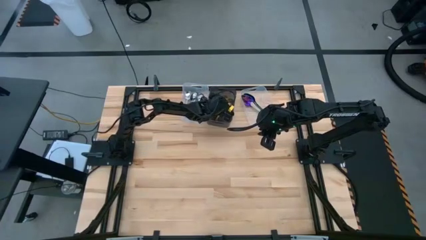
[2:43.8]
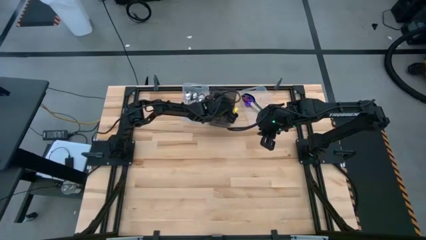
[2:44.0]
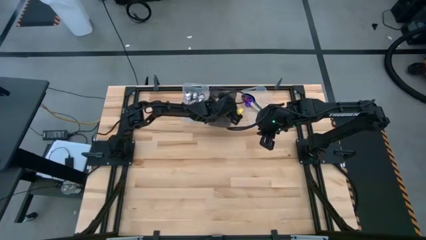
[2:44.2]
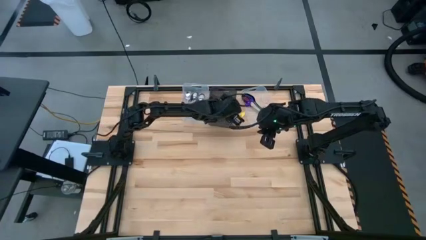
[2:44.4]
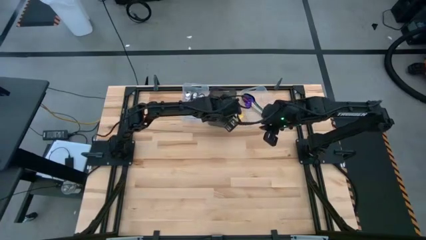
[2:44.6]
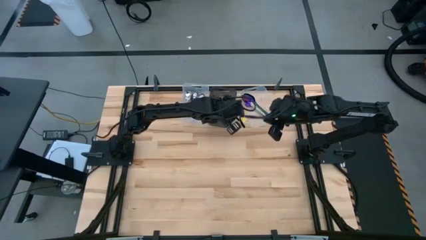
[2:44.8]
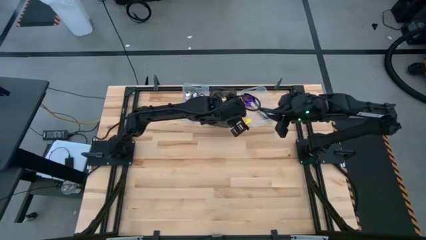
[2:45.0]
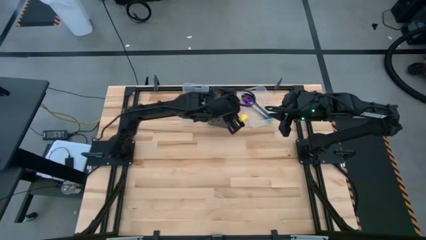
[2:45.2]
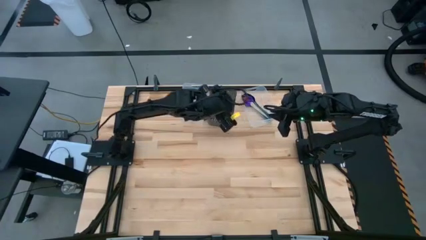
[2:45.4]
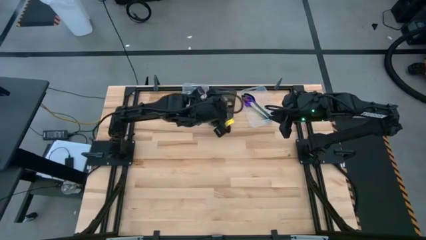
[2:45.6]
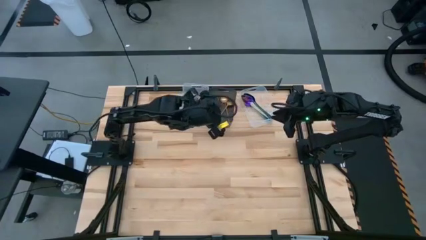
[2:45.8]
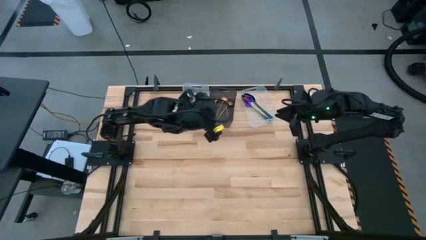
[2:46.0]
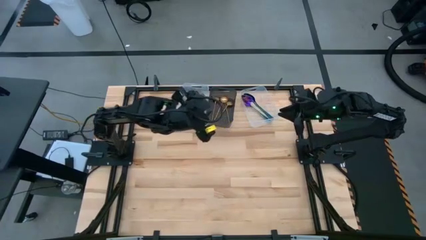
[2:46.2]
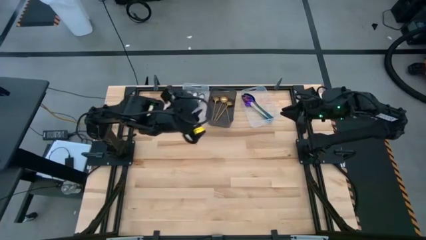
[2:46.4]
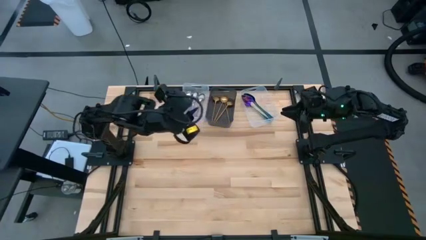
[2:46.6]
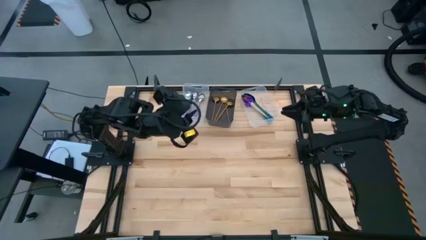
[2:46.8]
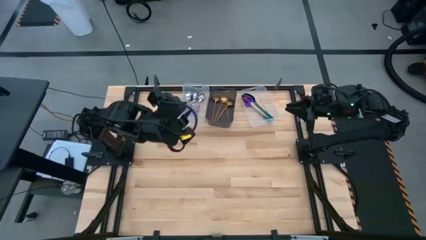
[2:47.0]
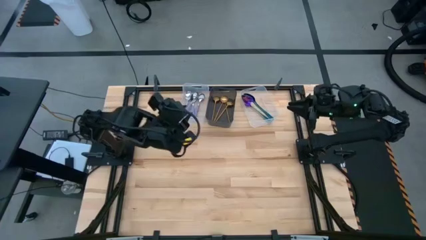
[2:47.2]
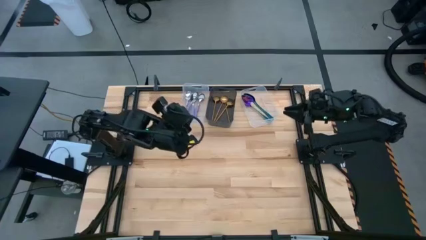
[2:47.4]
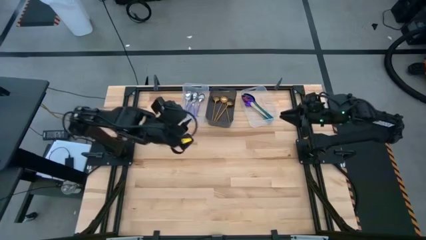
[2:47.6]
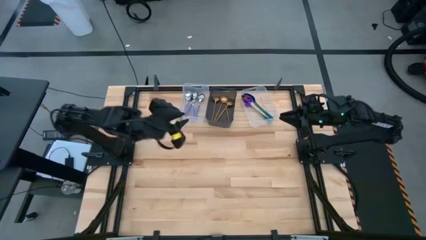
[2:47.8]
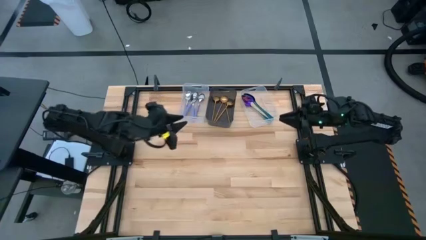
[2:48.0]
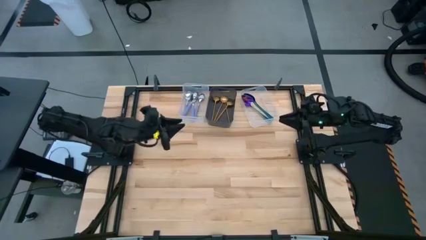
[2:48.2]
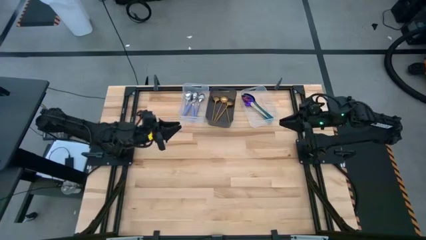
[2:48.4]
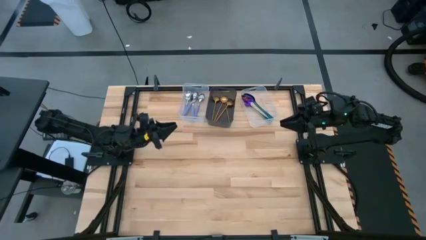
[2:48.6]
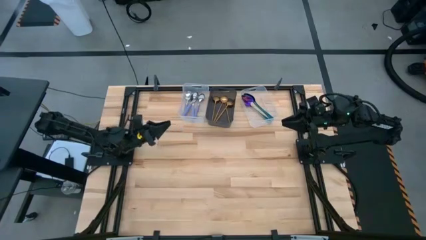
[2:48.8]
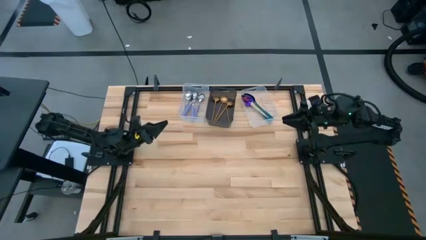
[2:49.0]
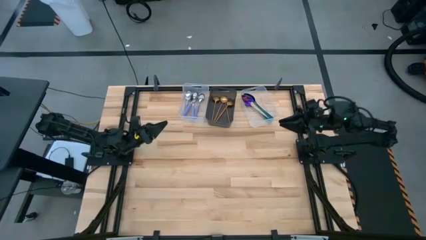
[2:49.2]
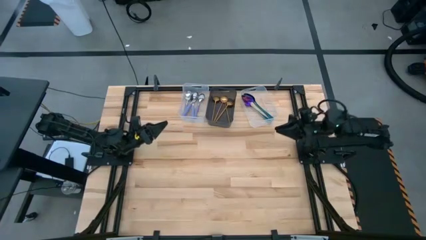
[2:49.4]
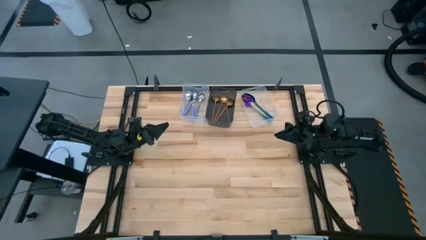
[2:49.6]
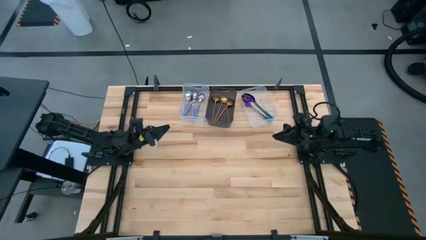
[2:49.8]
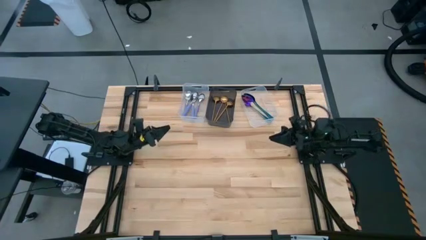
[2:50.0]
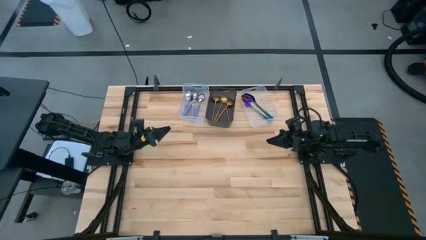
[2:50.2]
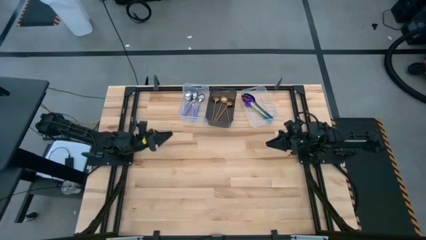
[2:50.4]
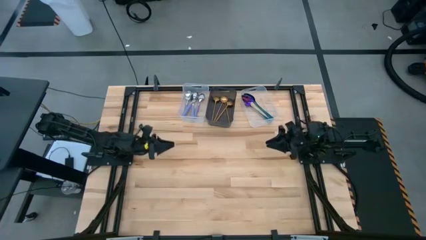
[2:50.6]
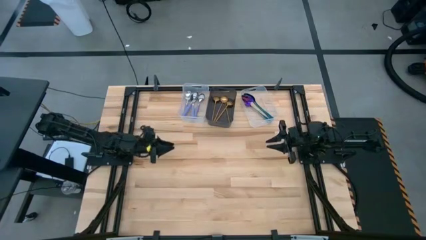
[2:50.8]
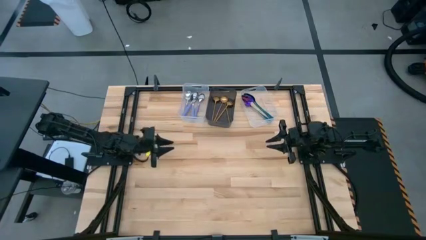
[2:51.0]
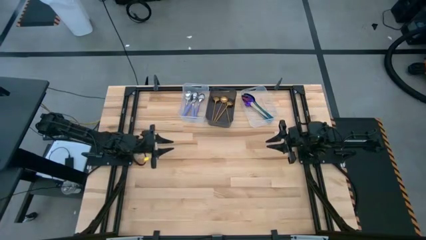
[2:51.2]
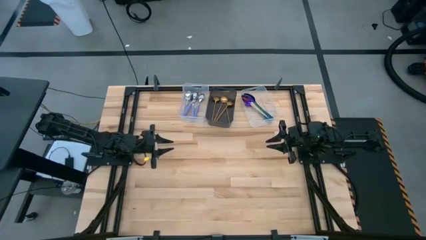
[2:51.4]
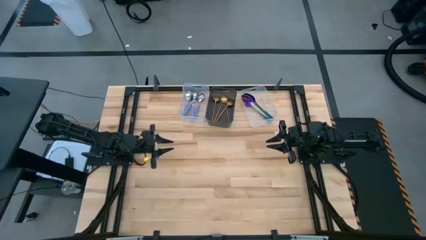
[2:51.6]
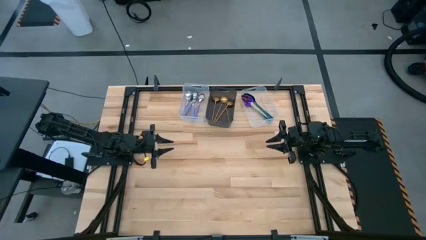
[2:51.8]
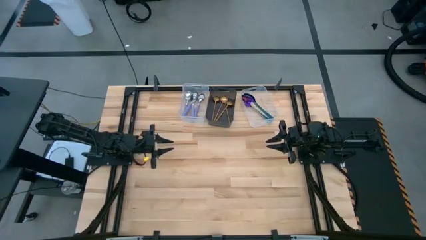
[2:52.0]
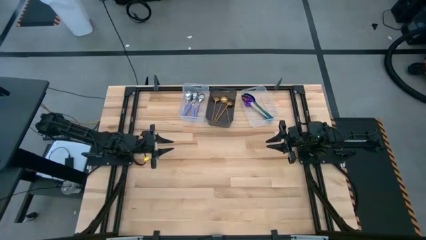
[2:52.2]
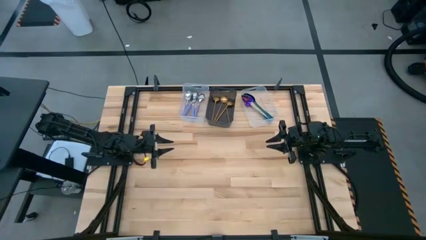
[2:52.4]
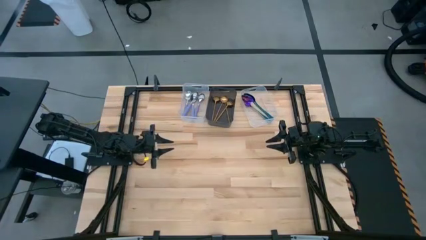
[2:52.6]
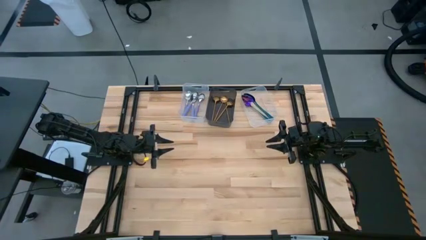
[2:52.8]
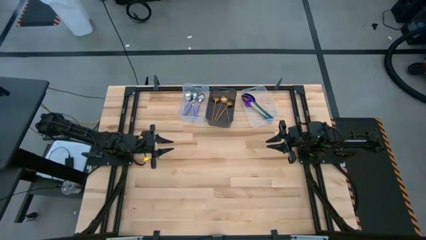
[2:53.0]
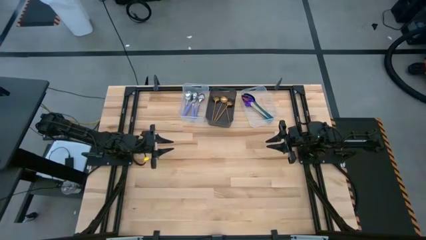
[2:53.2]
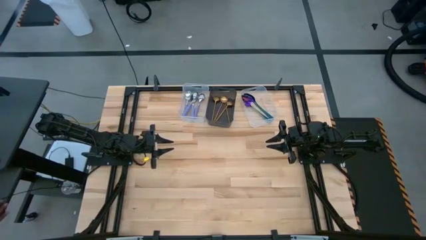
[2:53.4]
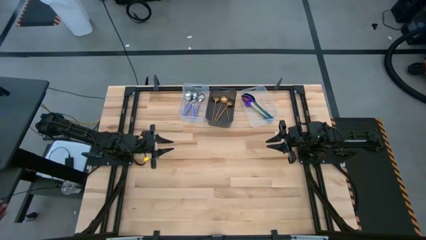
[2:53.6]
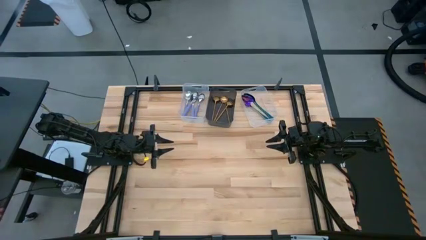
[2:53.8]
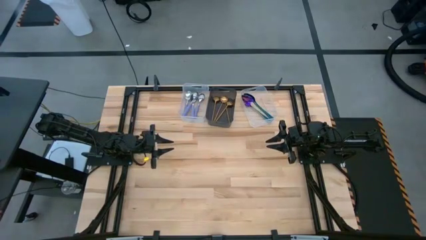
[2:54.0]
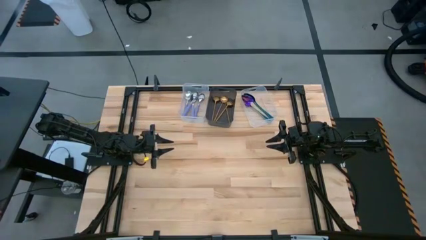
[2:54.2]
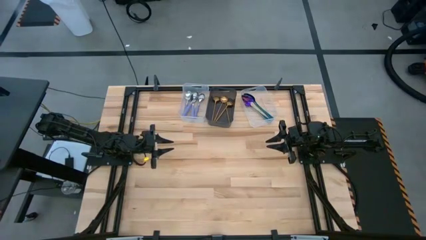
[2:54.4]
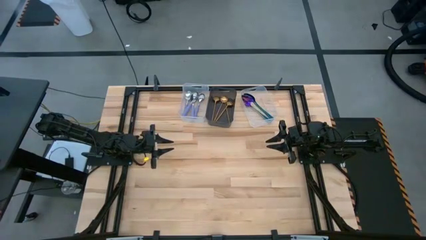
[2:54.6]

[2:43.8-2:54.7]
Task: Sort silverware by color (type)
Return to Home Position

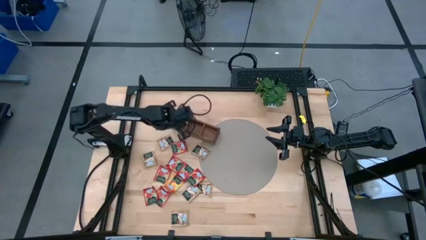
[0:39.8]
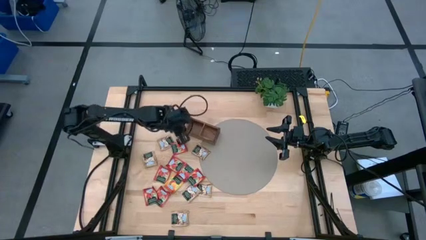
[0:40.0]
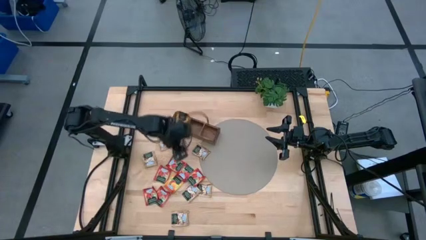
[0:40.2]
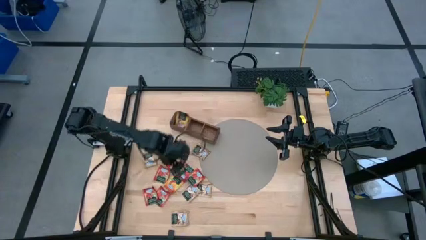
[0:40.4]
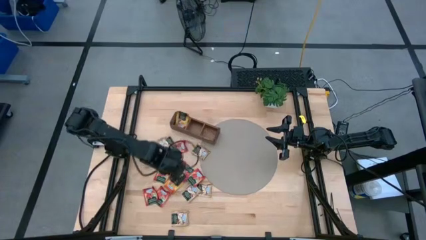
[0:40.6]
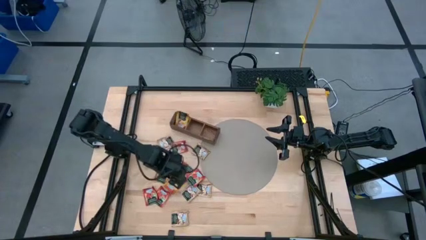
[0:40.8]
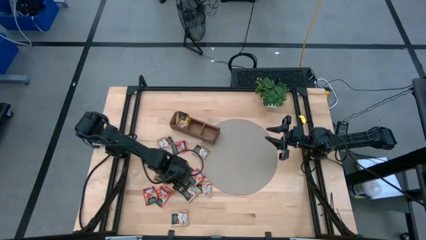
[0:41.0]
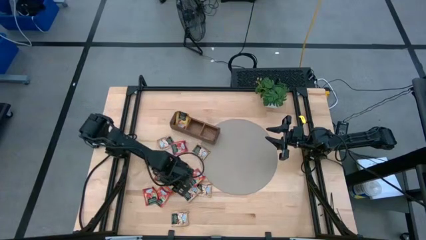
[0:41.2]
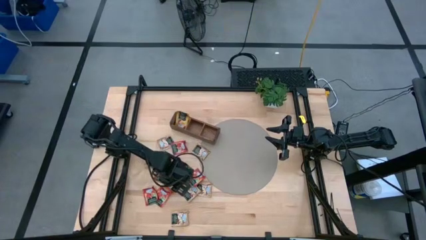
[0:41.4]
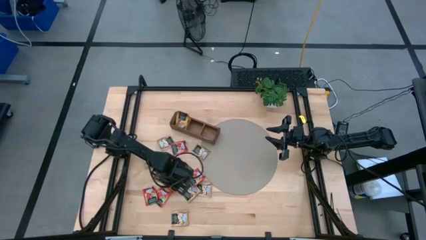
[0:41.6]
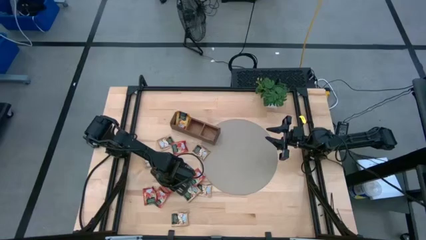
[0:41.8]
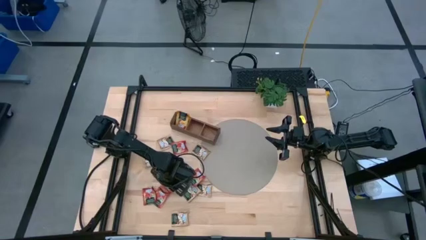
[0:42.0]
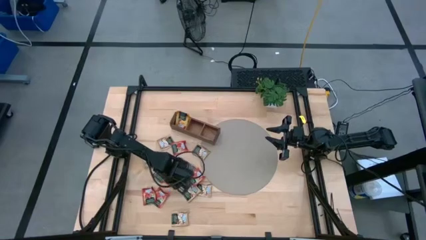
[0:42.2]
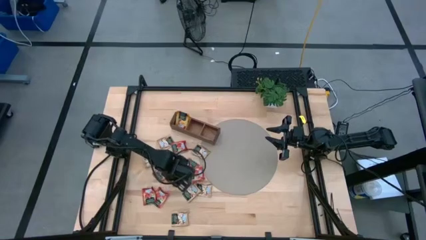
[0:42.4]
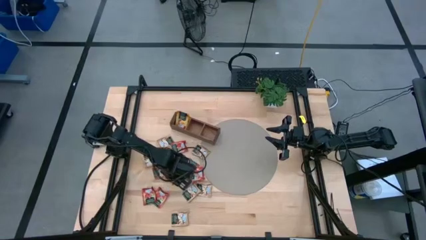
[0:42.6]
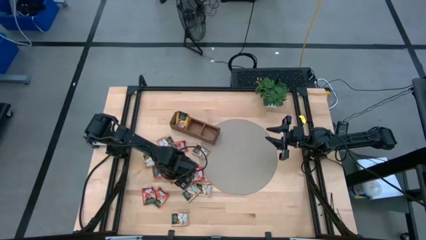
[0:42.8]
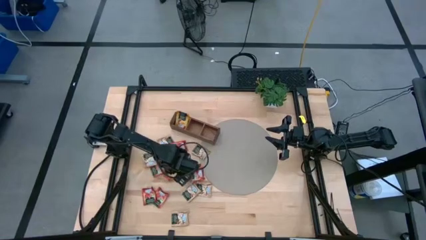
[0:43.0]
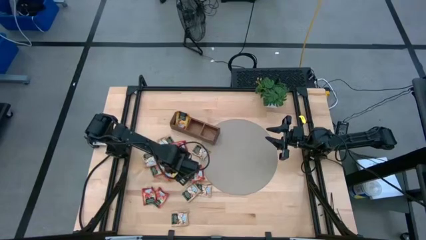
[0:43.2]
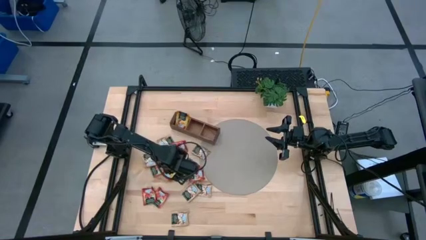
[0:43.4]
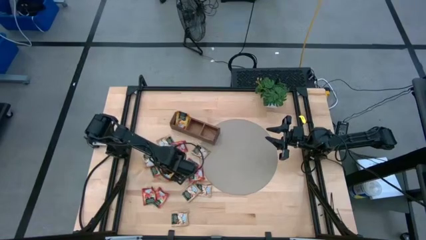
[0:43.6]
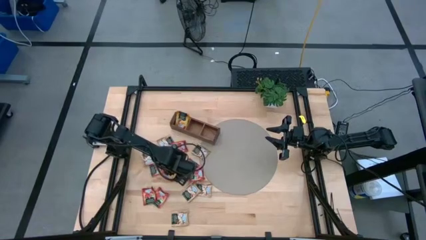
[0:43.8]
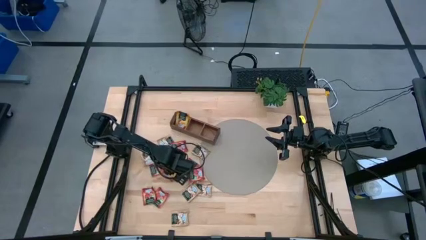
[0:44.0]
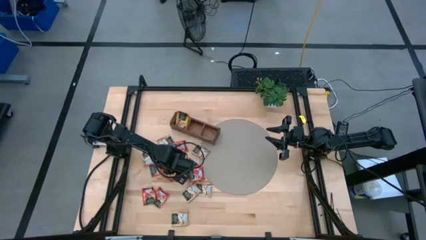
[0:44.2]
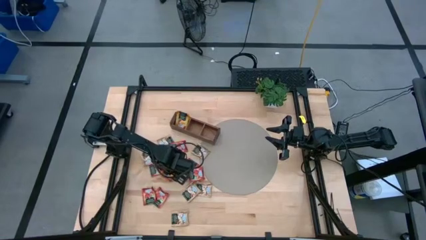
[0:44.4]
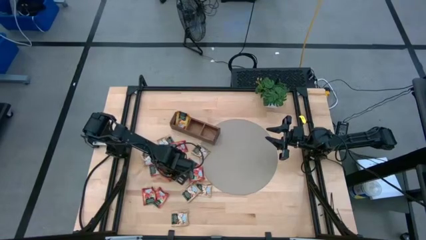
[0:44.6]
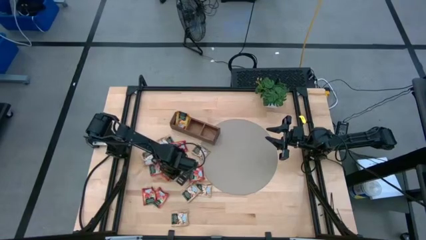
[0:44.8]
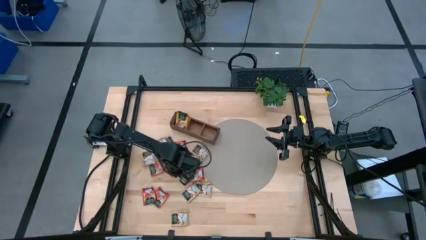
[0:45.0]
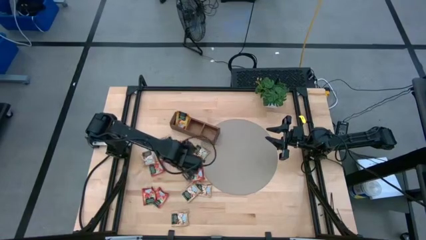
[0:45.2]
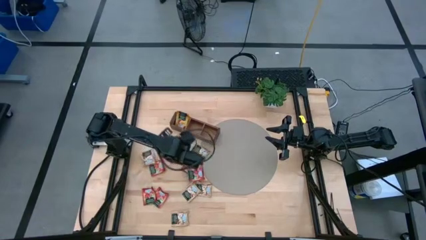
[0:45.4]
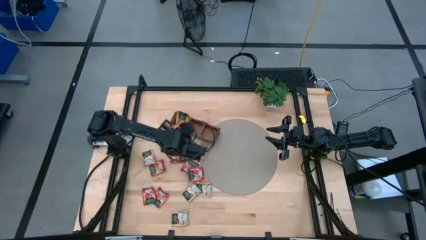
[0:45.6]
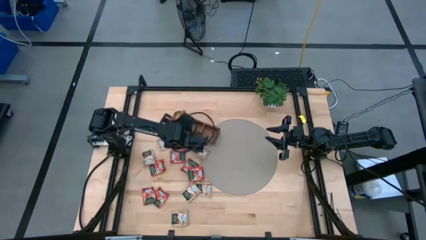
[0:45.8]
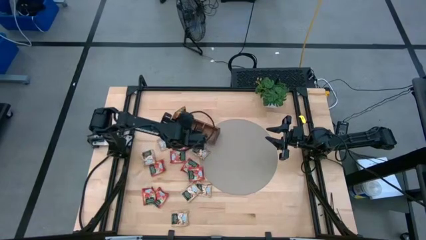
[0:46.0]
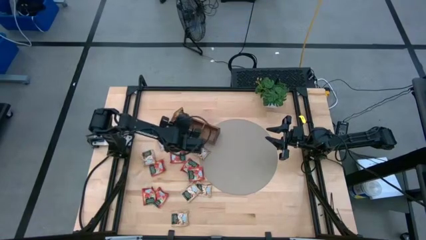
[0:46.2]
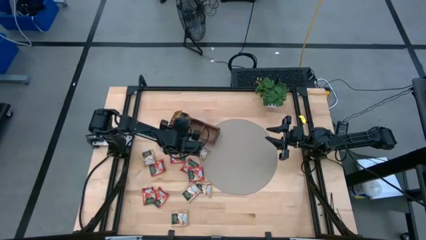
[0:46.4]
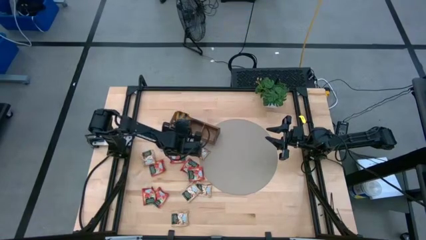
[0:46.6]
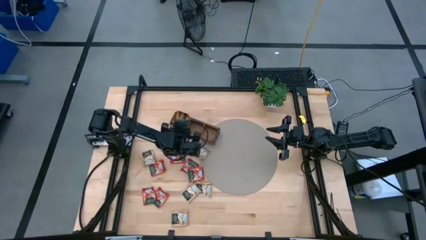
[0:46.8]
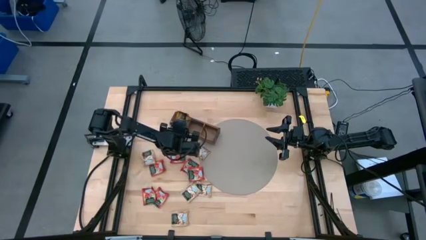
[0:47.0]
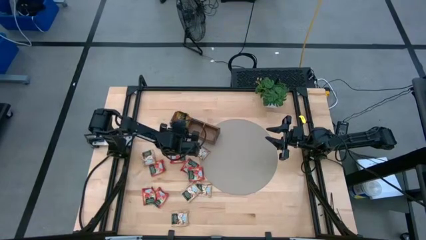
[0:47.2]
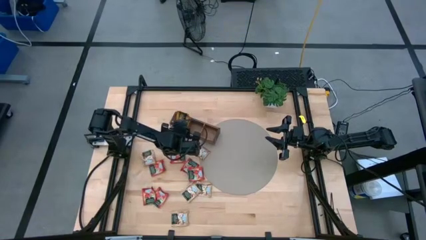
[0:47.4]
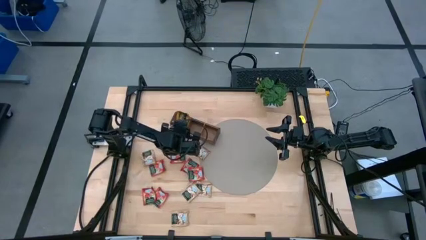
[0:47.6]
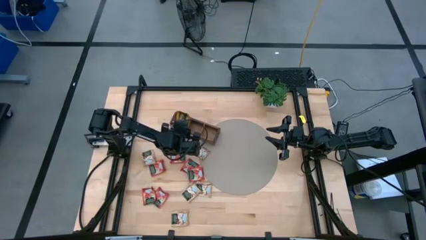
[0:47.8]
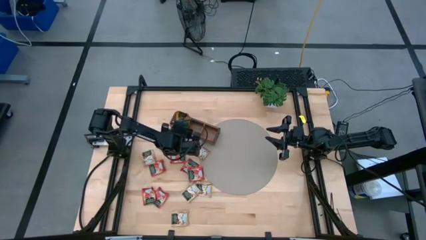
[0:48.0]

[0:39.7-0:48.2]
Task: Pick & Place Tea
Put the yellow tea bag into the left section of the wooden organizer
